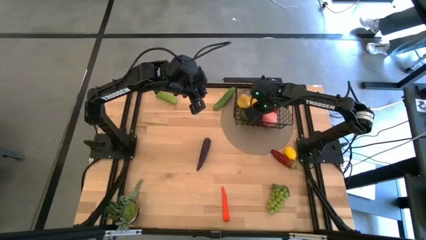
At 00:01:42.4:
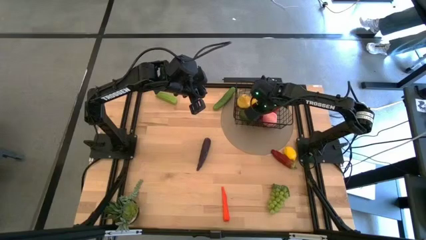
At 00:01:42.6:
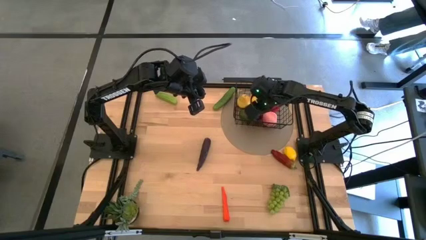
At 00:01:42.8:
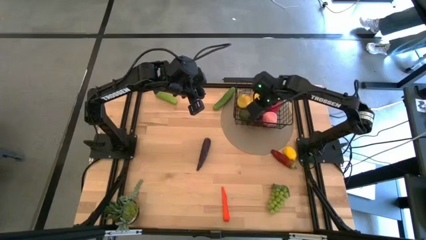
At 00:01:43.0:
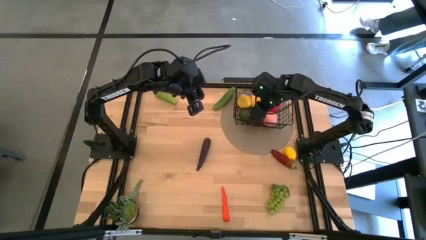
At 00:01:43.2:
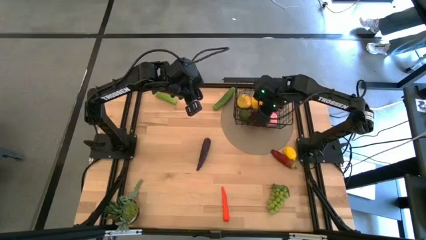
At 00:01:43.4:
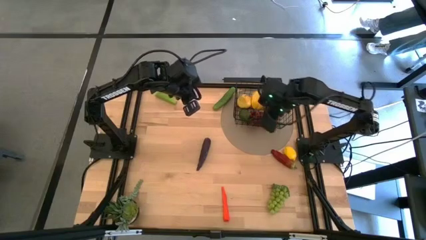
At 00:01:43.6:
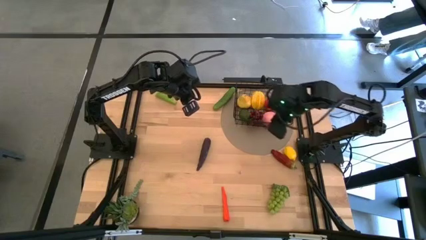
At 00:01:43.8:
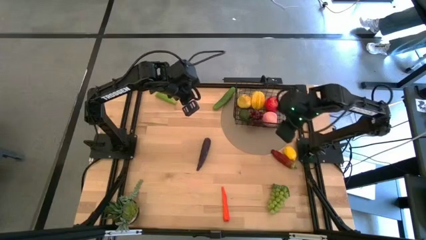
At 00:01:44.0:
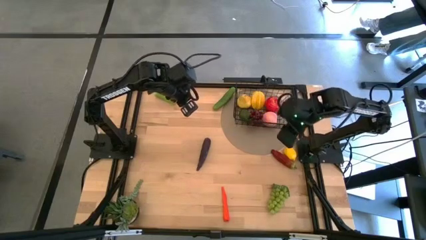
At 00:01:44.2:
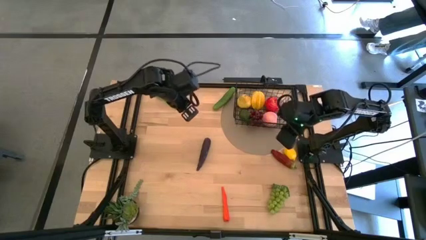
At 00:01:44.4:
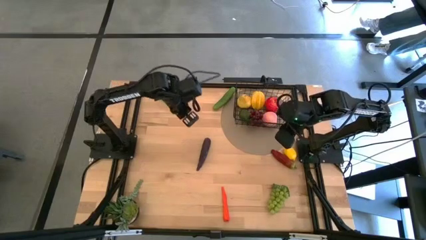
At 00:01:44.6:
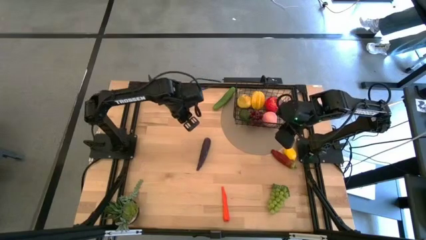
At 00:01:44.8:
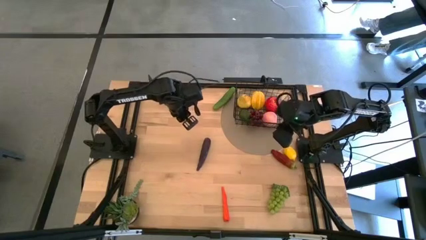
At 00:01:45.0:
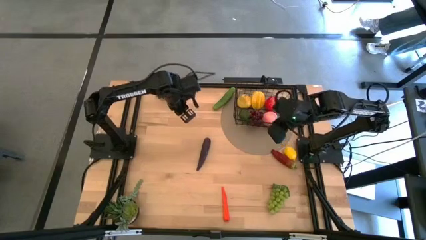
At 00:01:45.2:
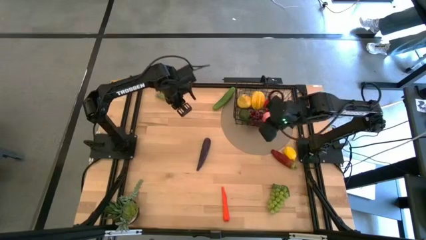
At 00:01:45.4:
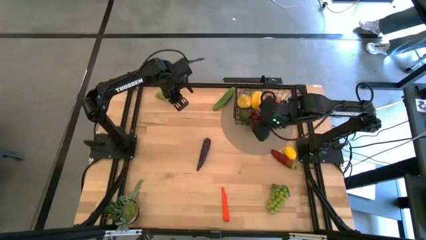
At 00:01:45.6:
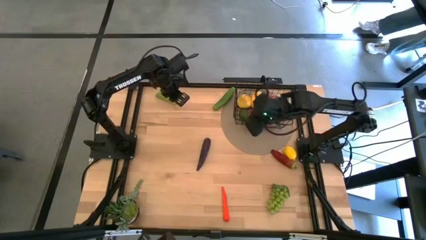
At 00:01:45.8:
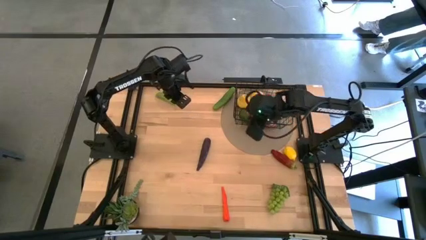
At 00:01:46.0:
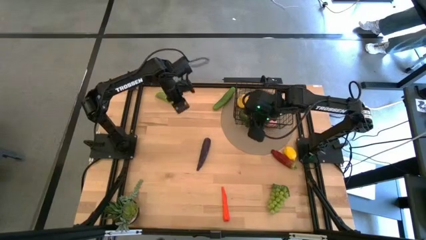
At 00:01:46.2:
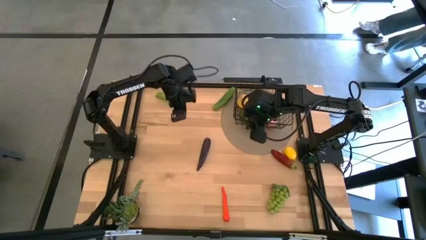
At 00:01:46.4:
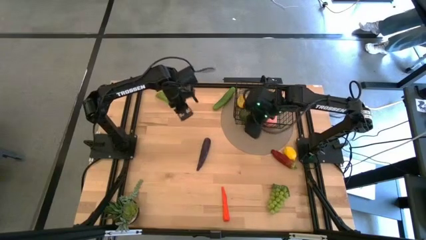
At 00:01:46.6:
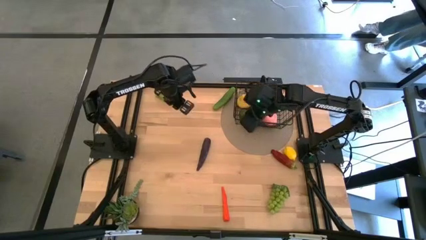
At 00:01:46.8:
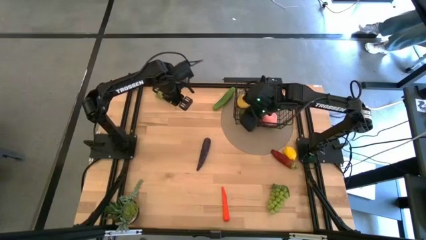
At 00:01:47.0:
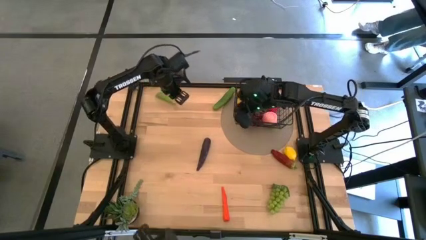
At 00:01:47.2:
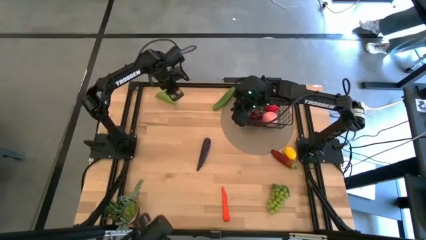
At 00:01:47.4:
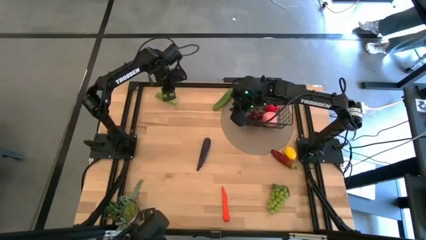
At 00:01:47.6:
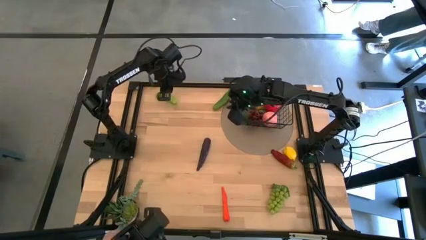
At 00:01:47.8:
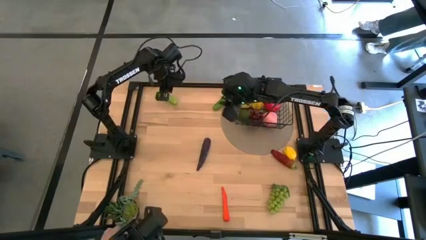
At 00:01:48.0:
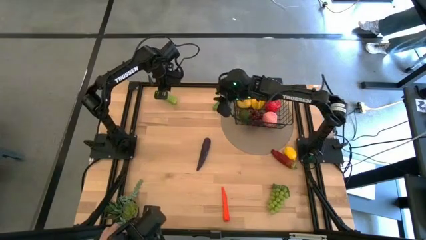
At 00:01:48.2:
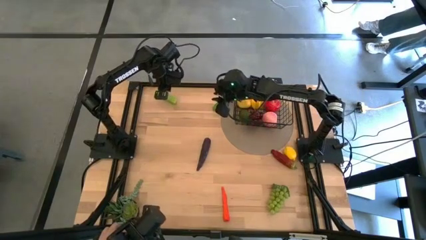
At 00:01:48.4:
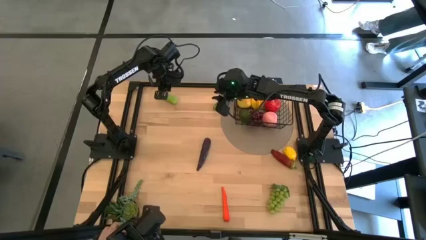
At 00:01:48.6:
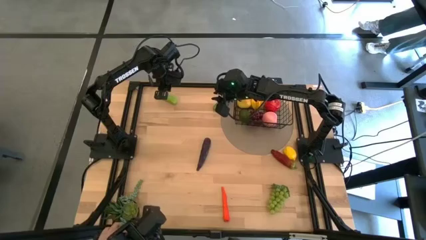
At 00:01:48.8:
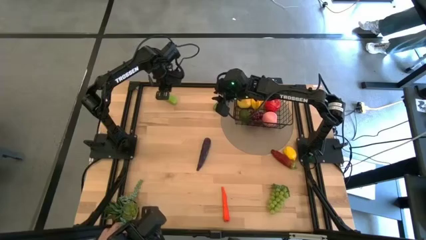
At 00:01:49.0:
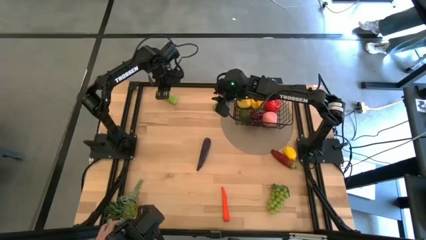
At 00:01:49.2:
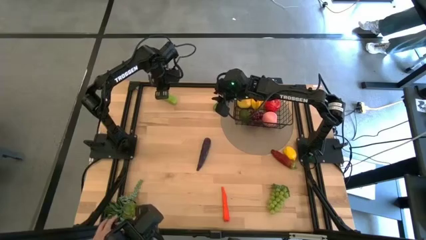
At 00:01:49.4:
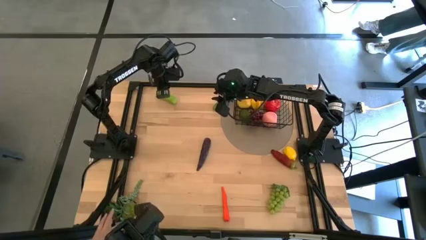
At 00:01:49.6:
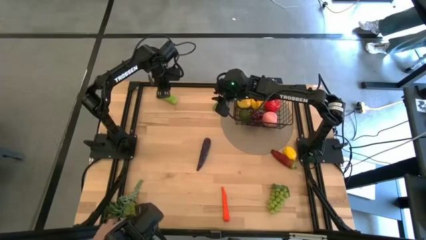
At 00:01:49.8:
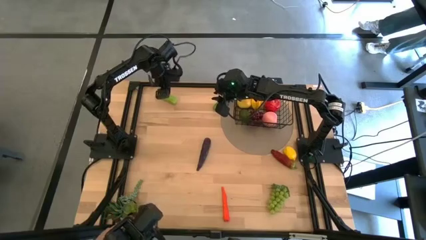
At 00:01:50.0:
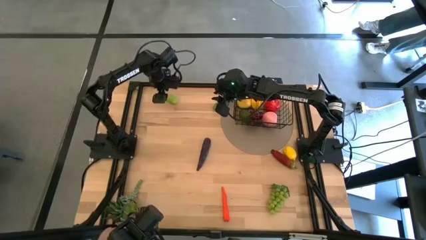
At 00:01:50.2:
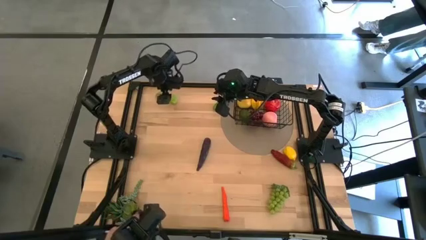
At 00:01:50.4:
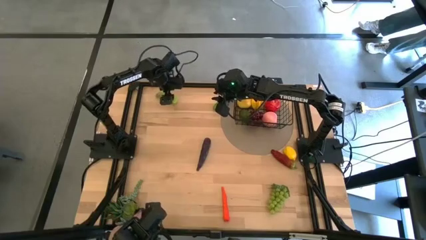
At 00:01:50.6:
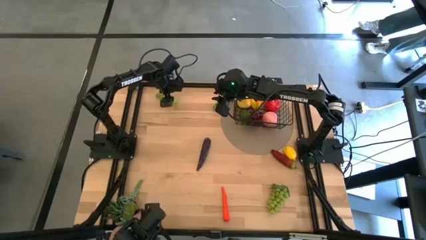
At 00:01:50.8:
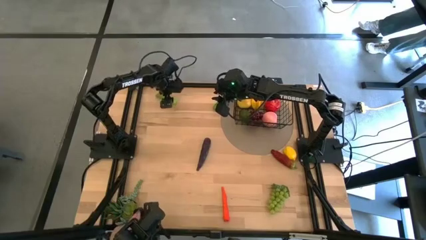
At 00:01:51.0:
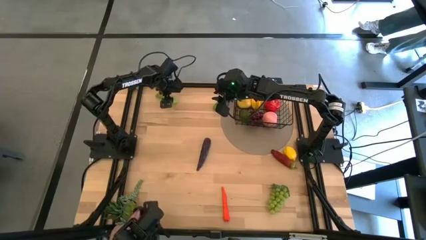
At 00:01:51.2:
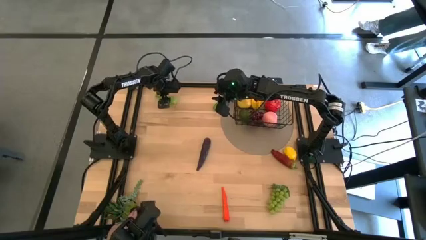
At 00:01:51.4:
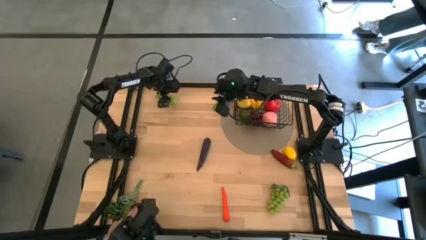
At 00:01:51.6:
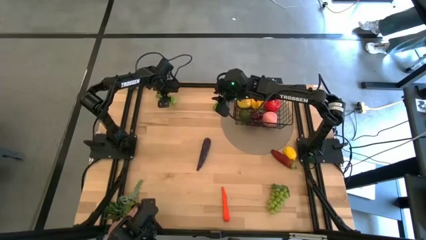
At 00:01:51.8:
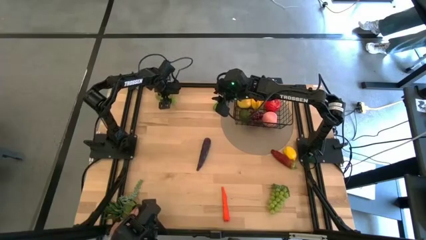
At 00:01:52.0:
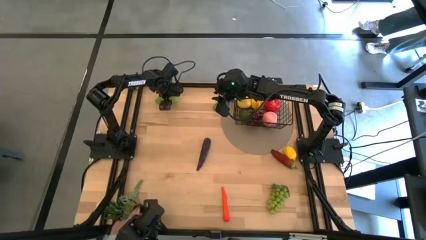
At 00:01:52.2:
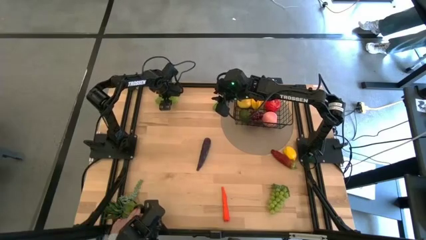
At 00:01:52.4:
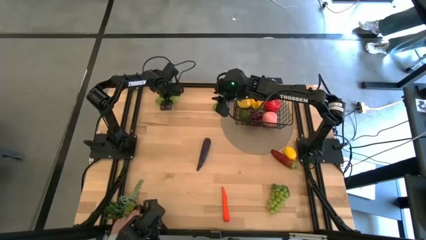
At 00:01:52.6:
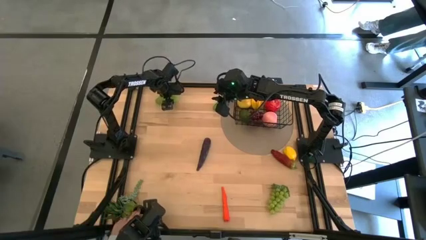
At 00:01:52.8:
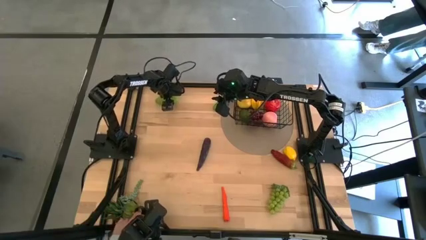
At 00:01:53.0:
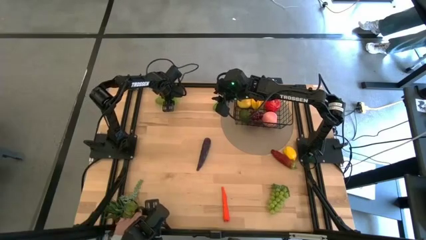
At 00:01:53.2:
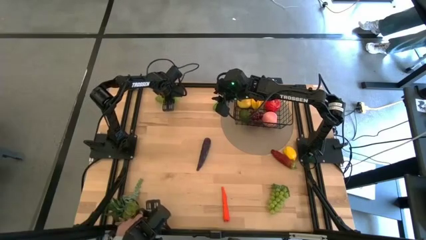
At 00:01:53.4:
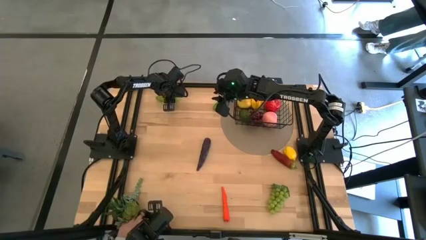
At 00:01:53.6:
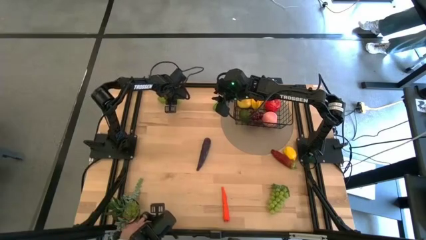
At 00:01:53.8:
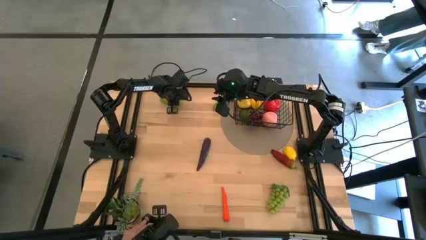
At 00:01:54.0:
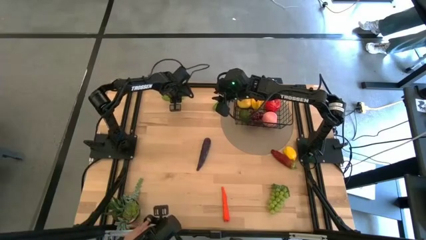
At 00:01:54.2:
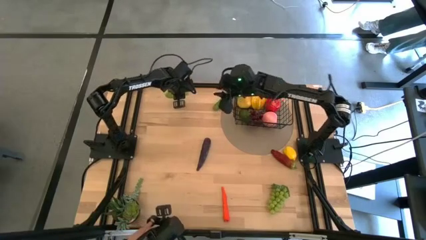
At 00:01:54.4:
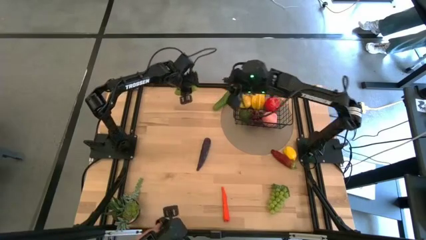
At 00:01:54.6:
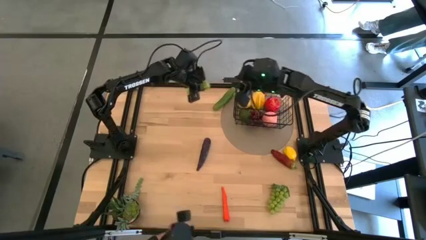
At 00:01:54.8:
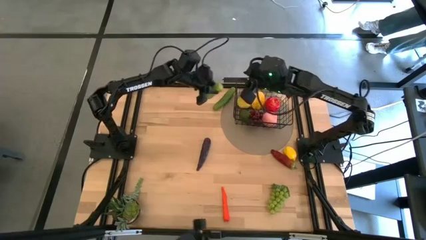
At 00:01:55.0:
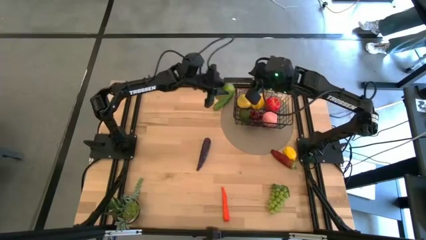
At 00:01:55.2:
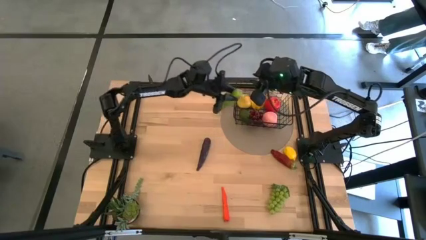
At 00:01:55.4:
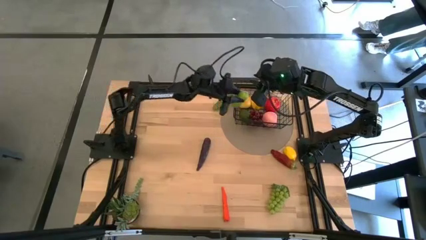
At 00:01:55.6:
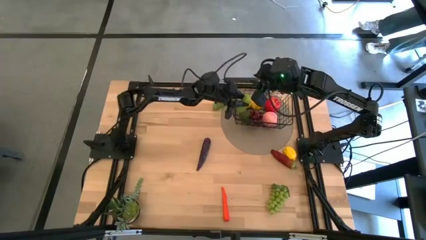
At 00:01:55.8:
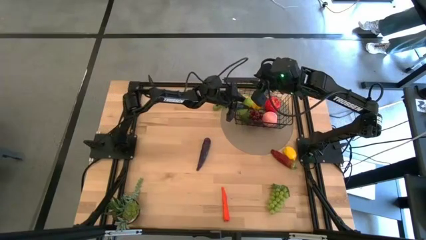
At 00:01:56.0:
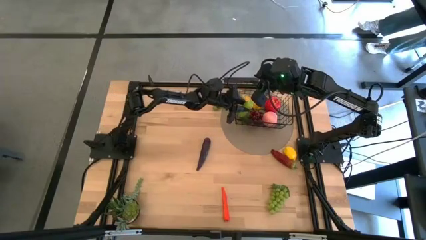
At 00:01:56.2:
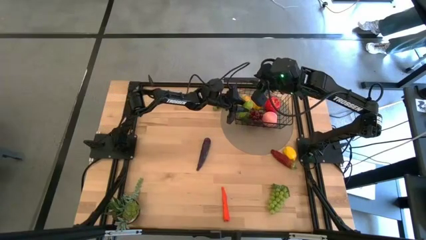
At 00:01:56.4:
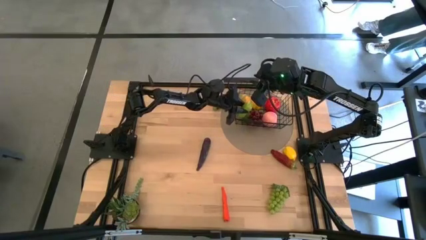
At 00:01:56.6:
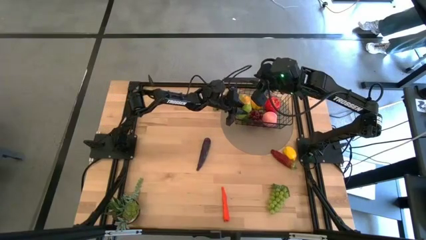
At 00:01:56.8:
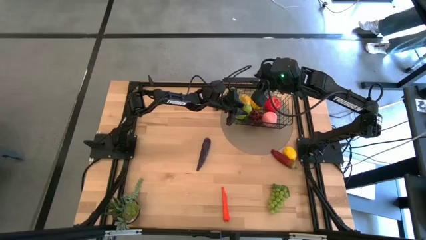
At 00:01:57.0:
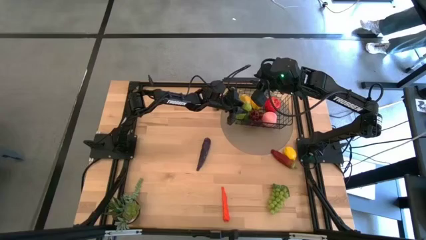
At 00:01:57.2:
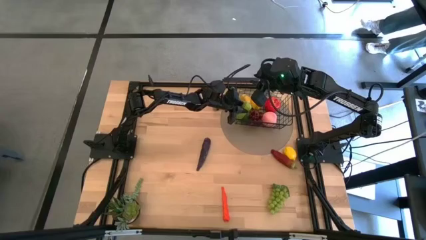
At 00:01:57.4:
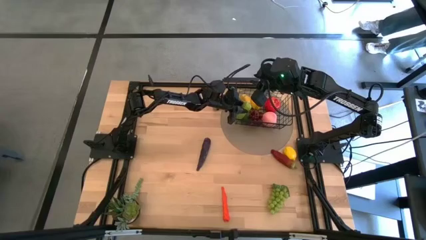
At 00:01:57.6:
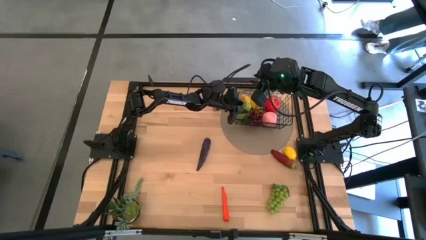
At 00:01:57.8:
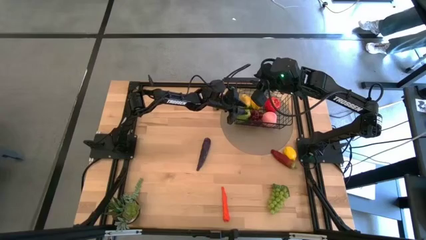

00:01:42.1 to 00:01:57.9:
Task: Build produce basket
Put the left green cucumber into the black wire basket

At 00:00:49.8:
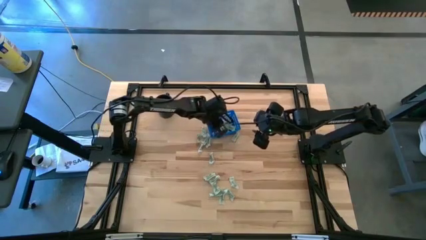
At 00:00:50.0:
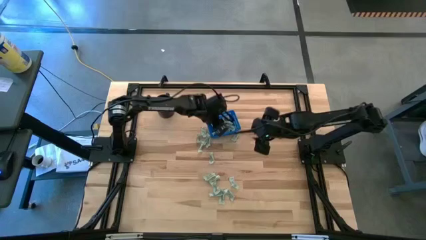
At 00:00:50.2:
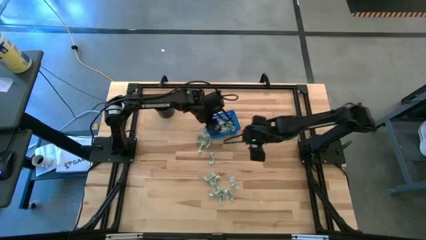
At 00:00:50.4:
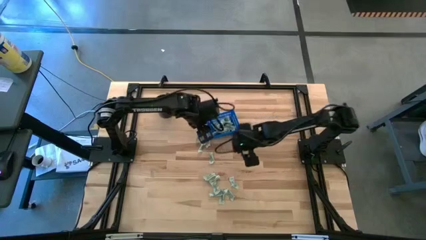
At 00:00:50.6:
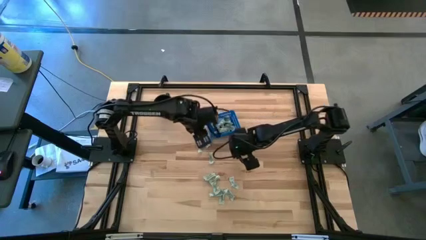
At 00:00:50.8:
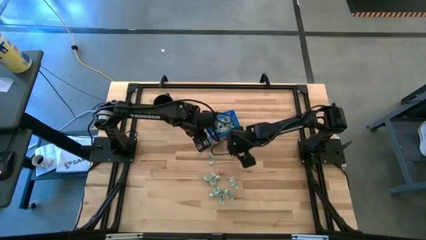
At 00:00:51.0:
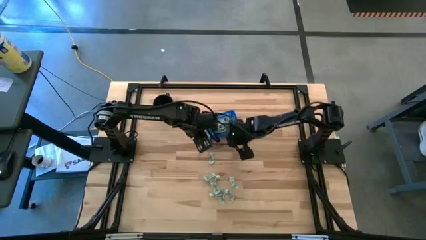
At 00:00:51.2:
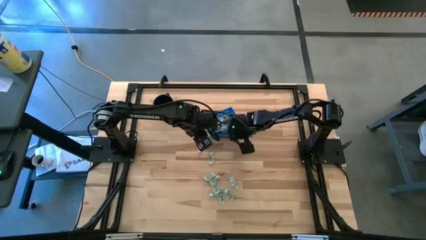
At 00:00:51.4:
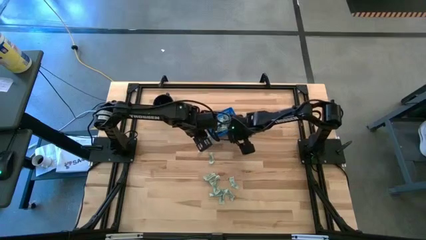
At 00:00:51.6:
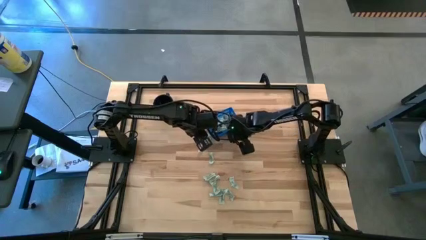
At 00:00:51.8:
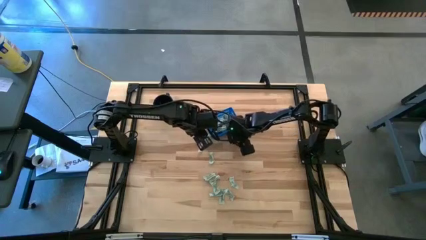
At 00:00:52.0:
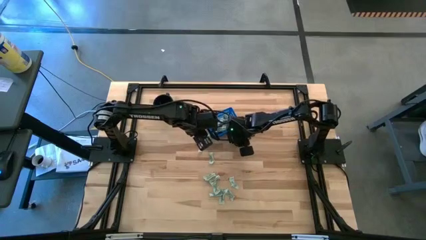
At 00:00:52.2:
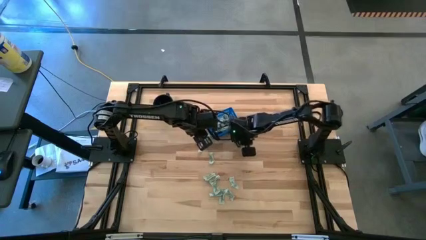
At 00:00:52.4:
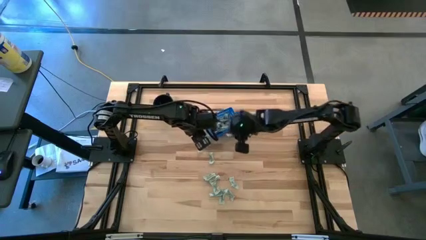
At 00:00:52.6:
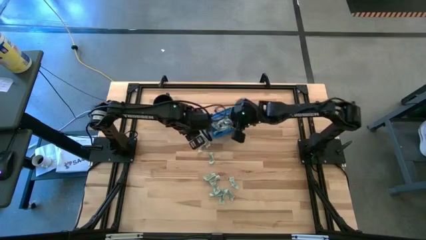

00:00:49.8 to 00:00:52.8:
Task: Pick and place Stevia / Truvia into bins
Put the green stevia packet into the blue bin
